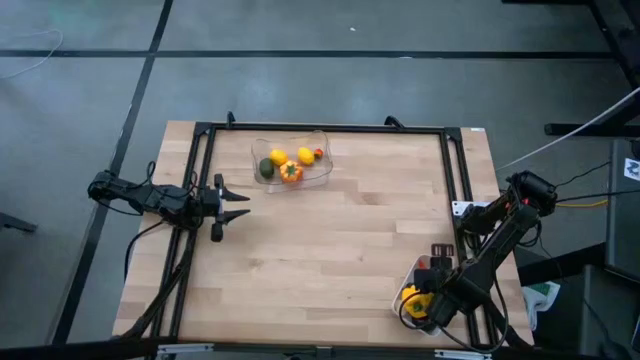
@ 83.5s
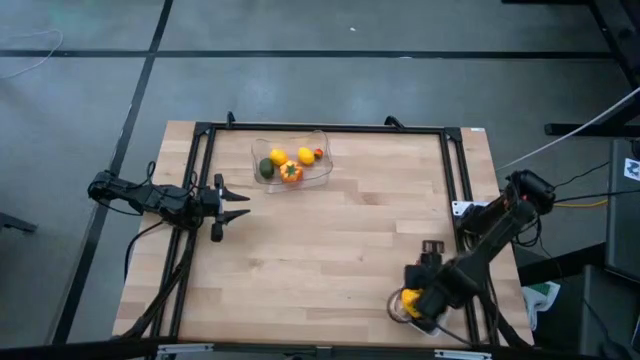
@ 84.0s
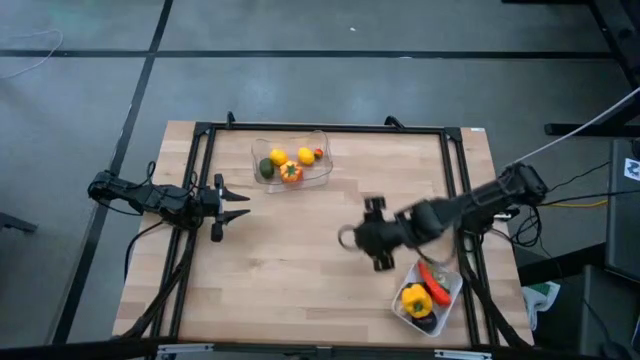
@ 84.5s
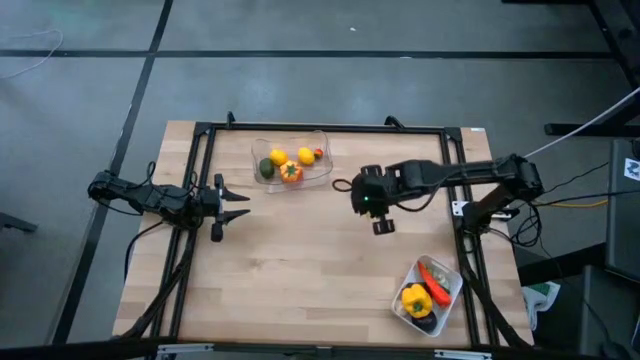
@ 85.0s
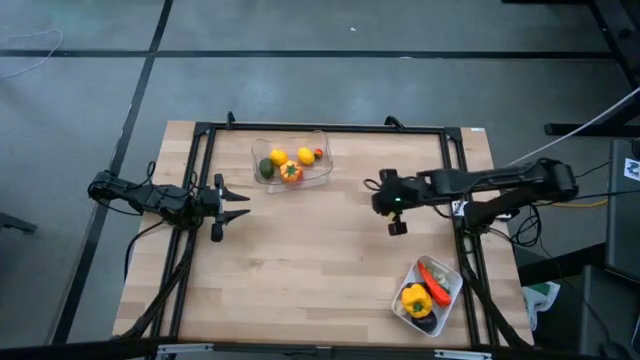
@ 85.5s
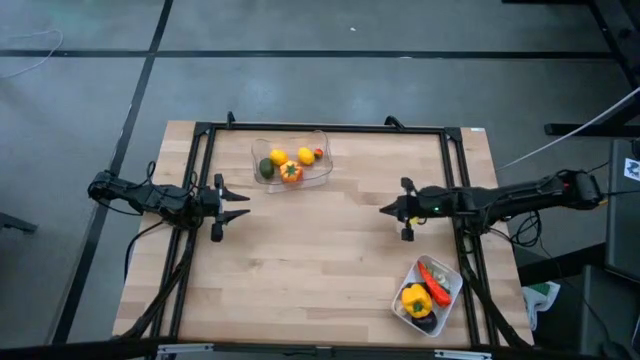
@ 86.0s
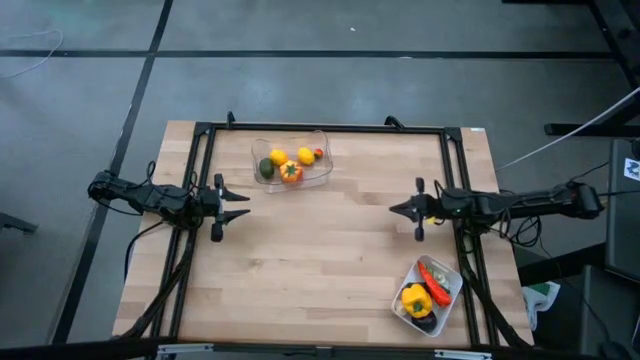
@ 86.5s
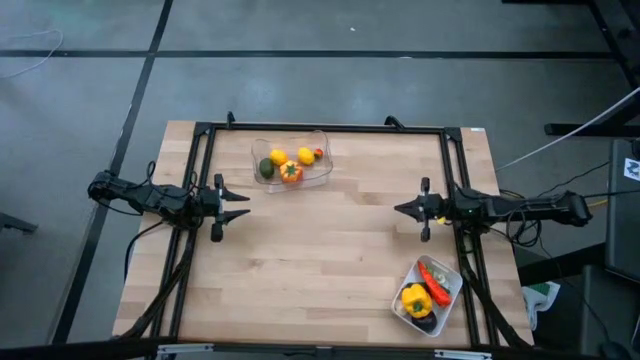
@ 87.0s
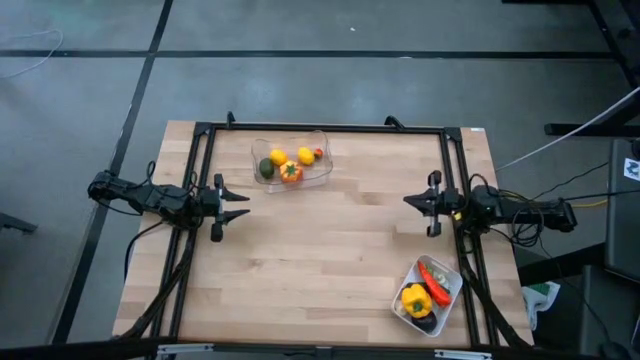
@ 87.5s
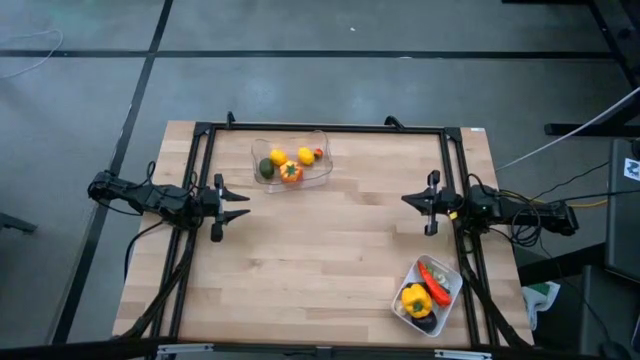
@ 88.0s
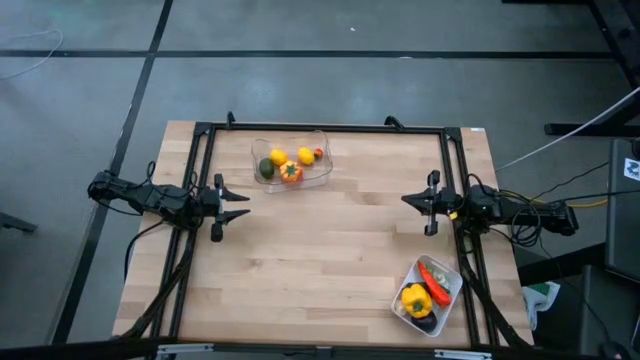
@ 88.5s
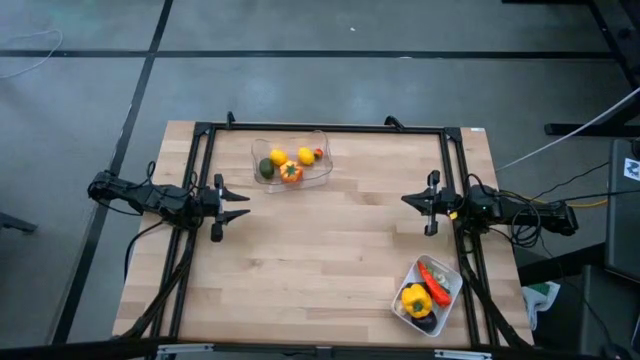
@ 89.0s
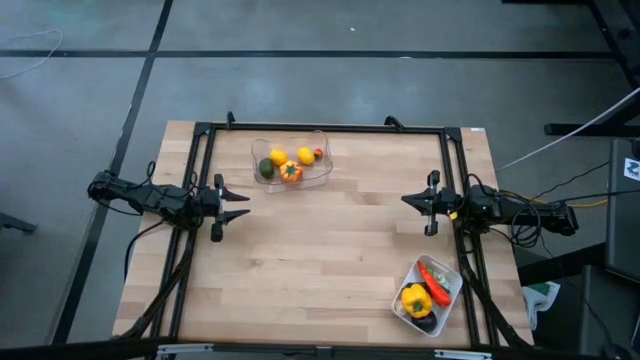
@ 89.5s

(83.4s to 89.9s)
Task: Sort produce into baskets
Return to Home Position

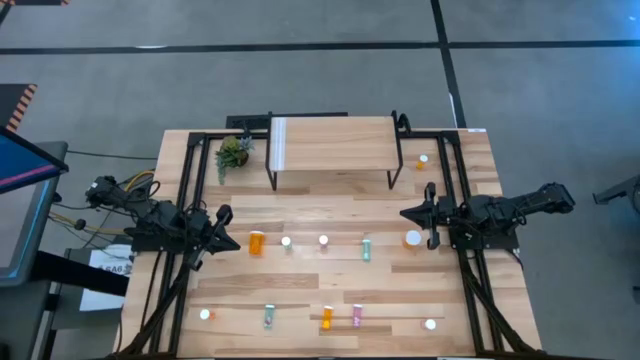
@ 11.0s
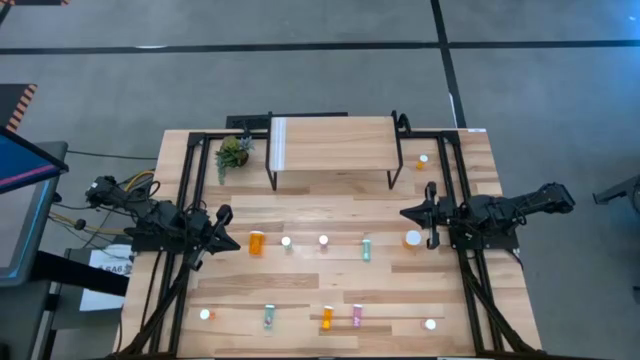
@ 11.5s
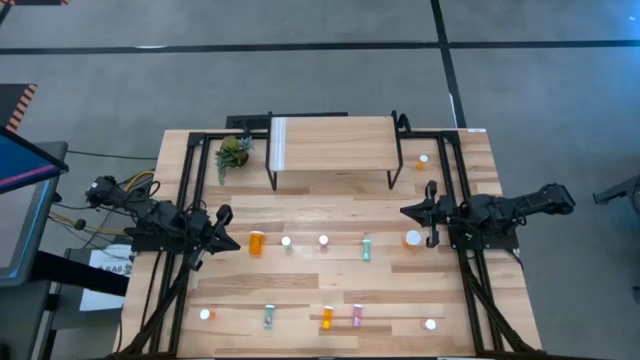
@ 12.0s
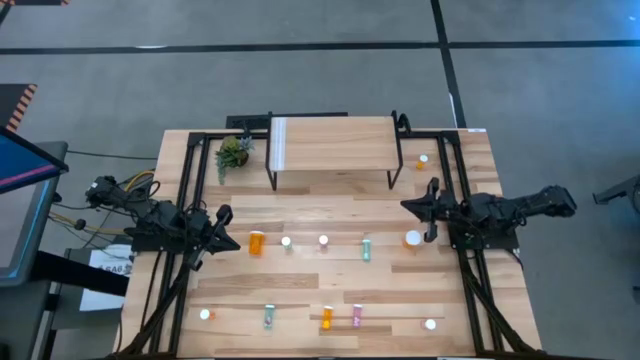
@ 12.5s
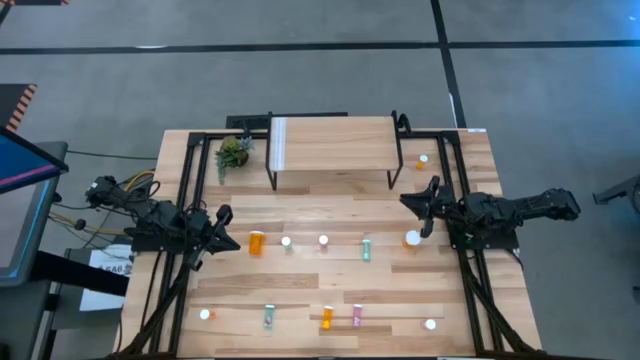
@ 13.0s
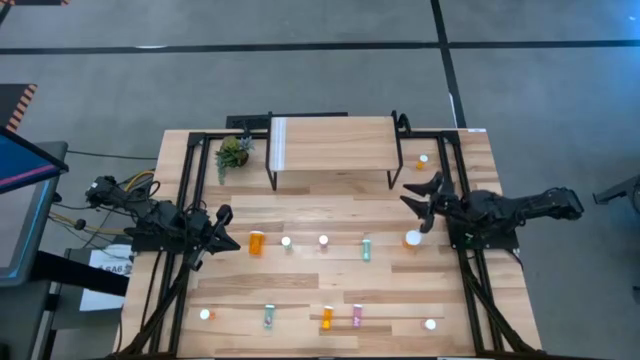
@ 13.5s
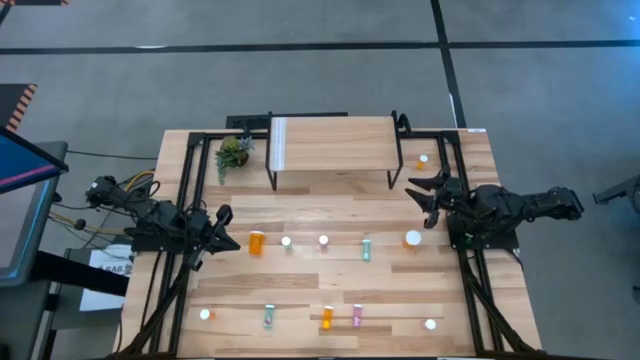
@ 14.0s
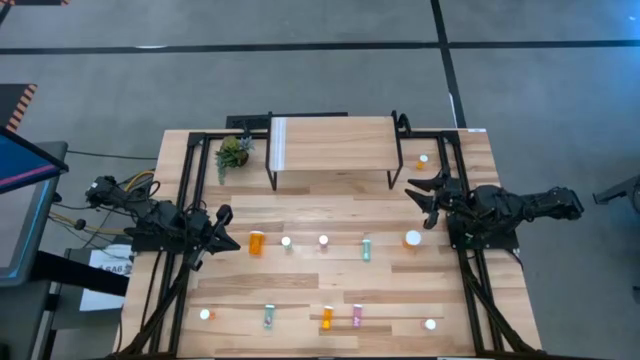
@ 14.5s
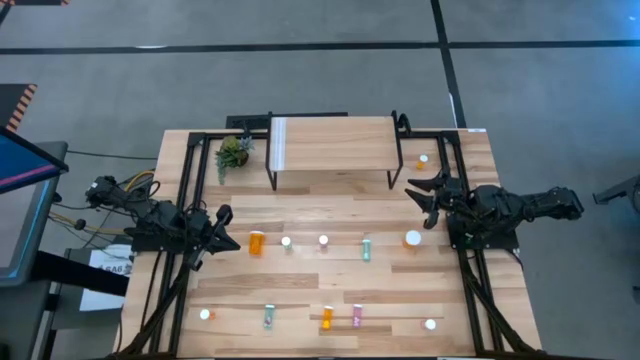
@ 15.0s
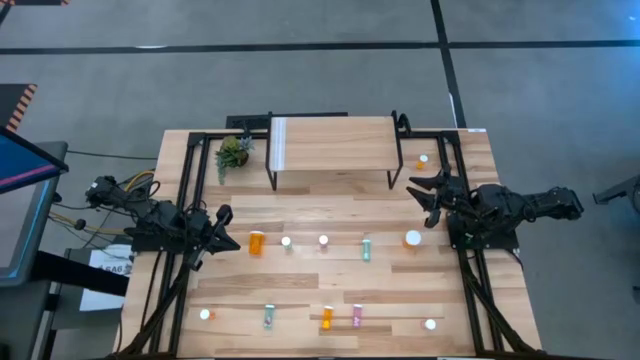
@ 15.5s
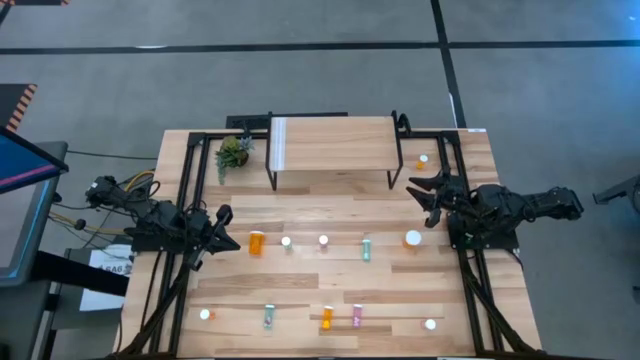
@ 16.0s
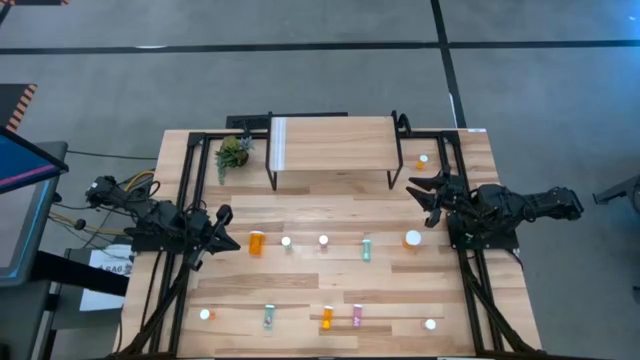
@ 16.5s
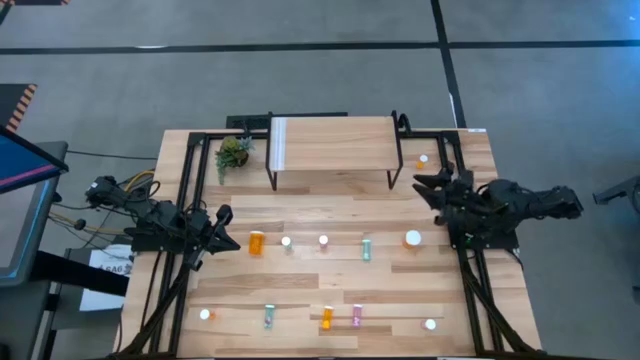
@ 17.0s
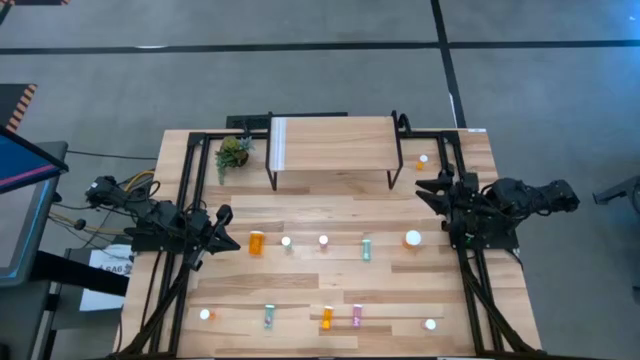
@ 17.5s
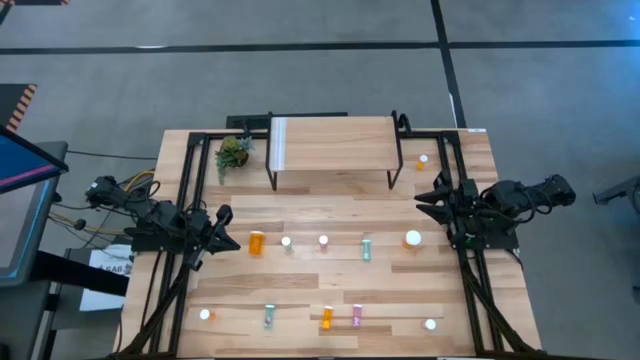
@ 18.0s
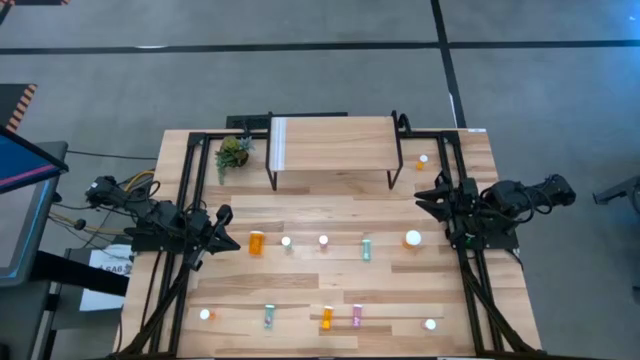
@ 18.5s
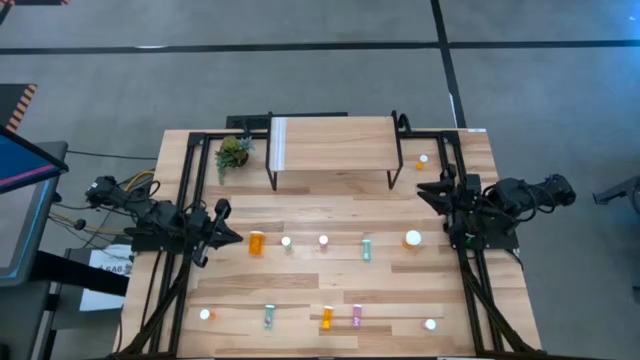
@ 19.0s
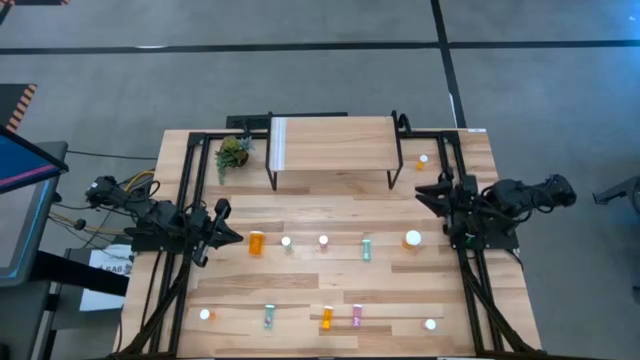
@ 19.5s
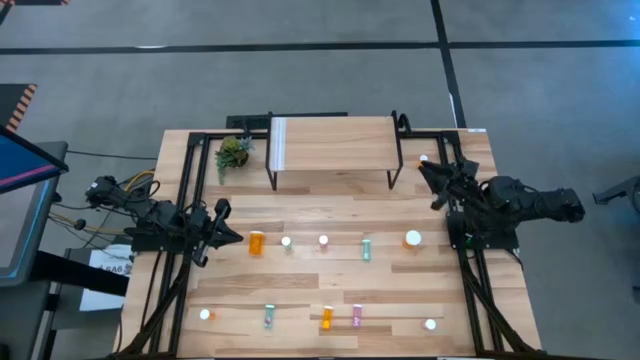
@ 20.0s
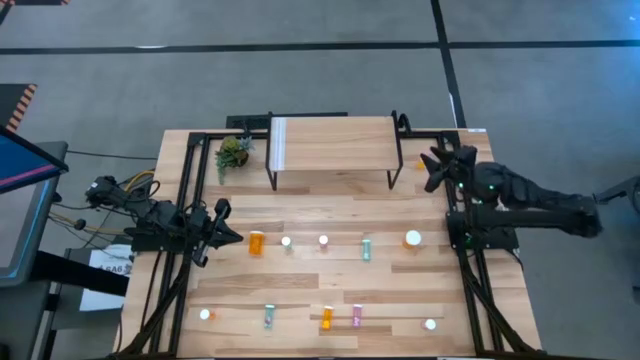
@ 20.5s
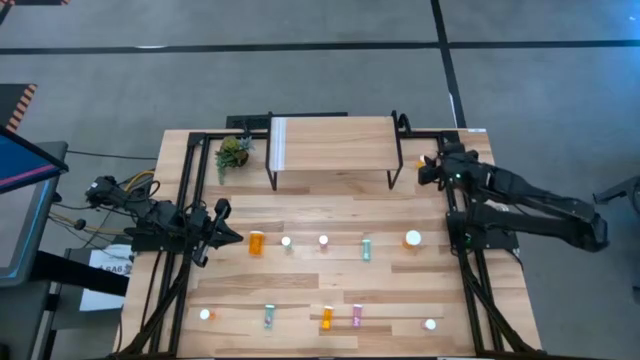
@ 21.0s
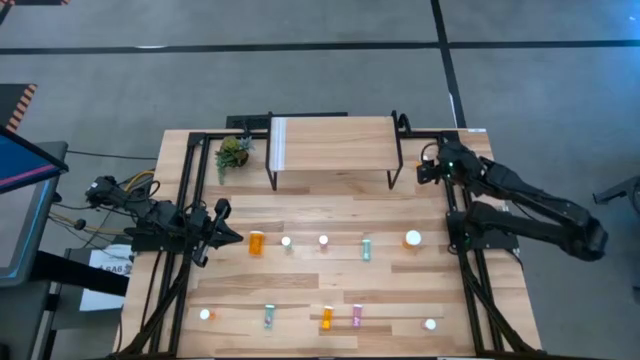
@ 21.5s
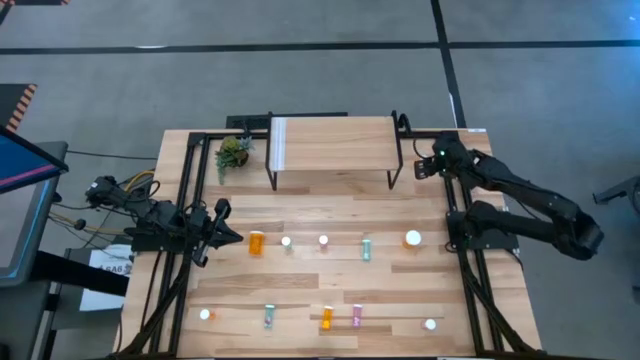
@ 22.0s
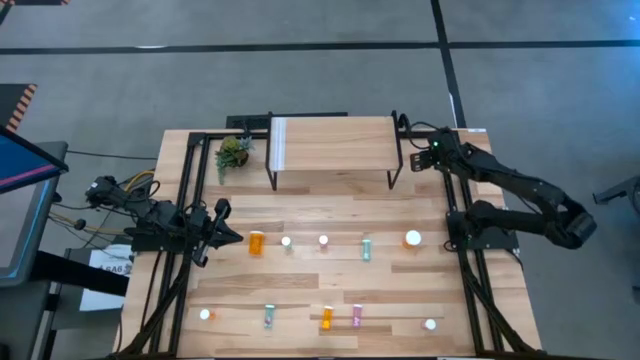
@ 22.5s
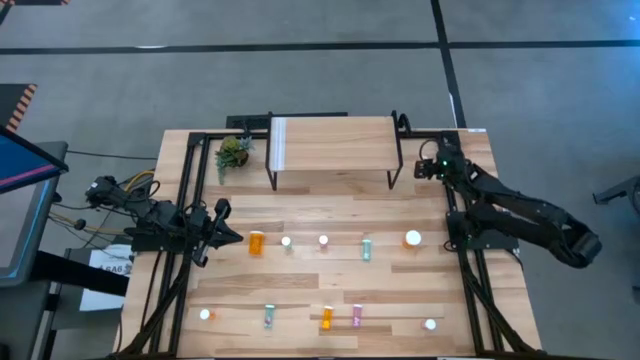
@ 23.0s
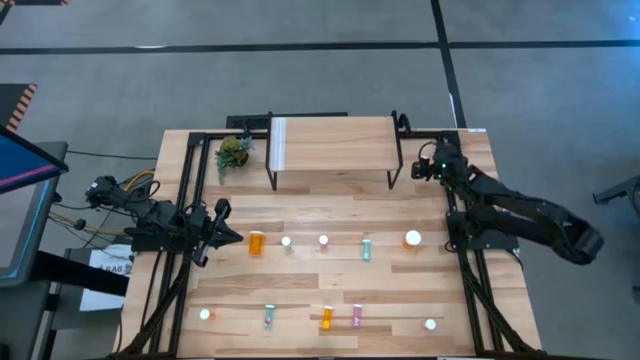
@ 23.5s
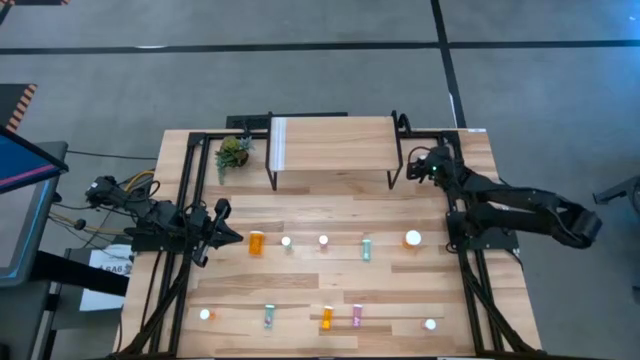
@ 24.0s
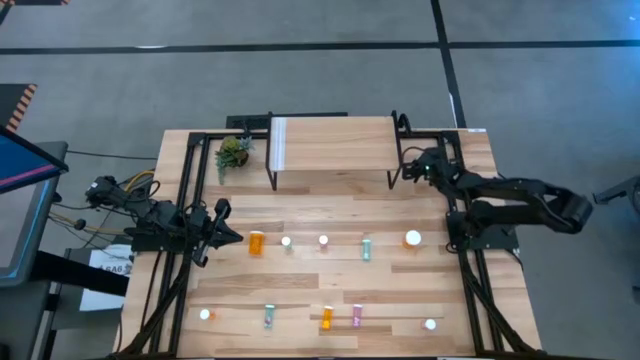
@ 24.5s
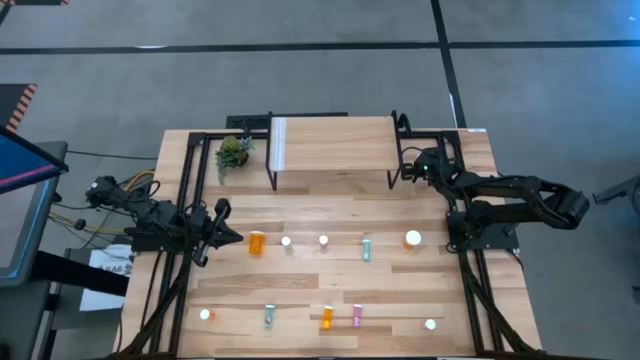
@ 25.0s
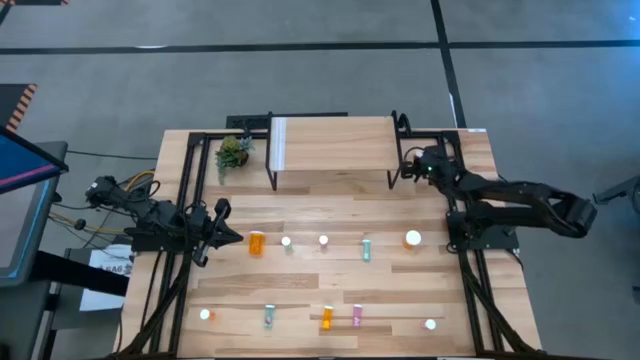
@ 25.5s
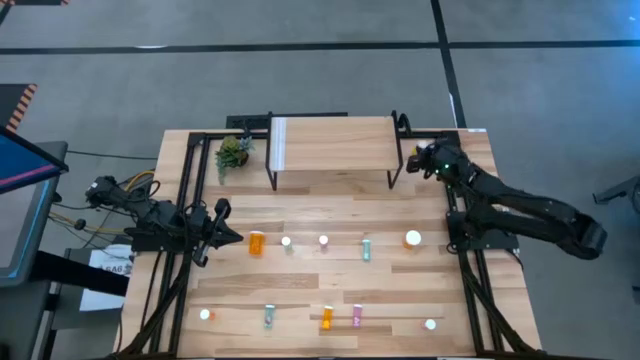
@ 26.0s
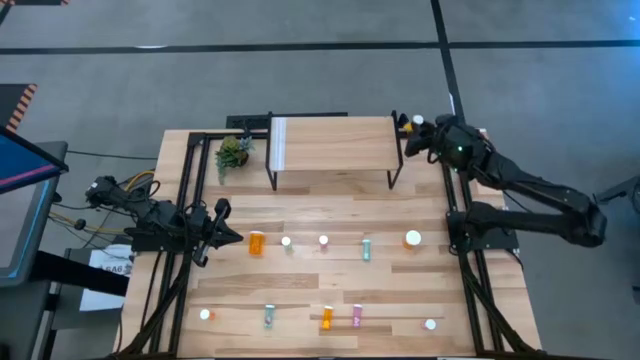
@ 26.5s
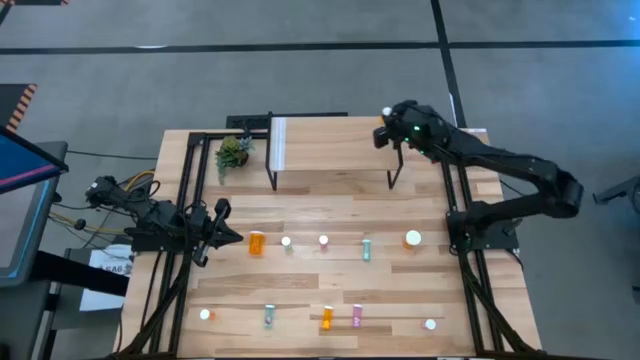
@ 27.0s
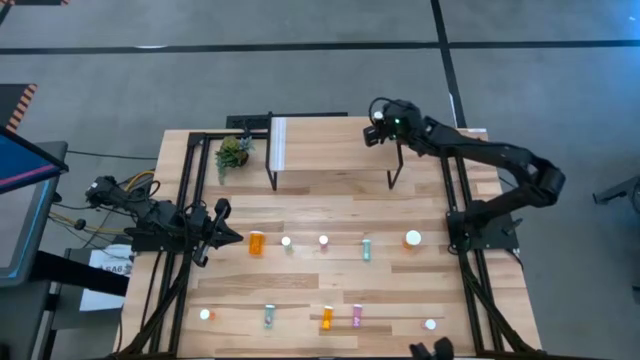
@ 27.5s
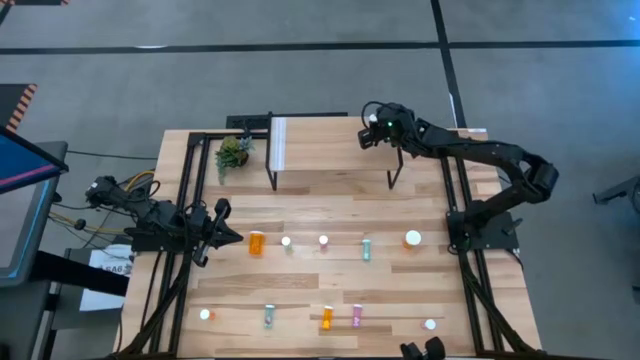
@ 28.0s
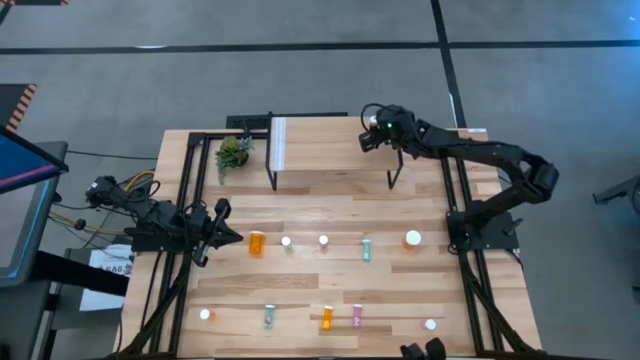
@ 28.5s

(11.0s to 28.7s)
Task: Pick and place medicine bottles onto shelf by color
Put the top small orange pill bottle on the shelf
